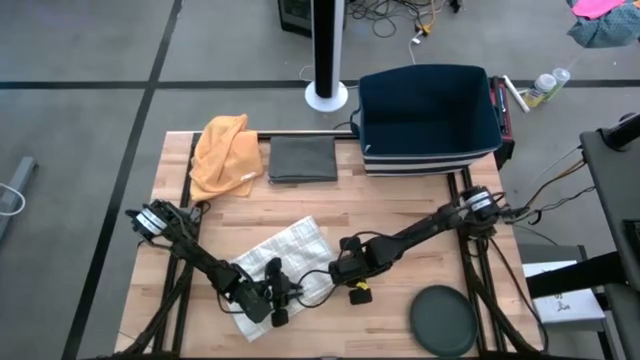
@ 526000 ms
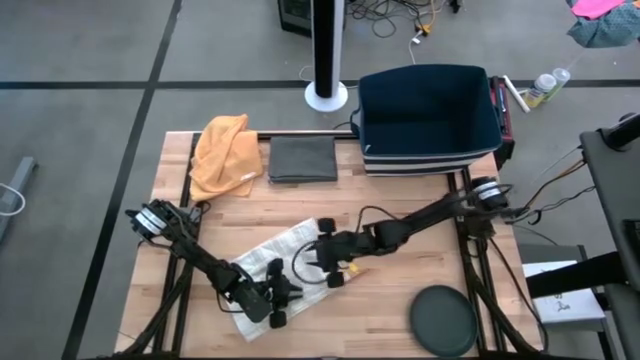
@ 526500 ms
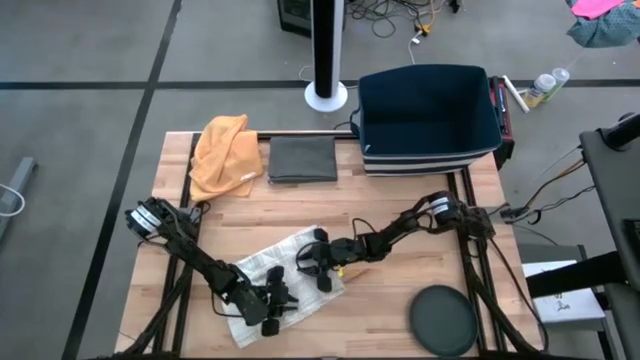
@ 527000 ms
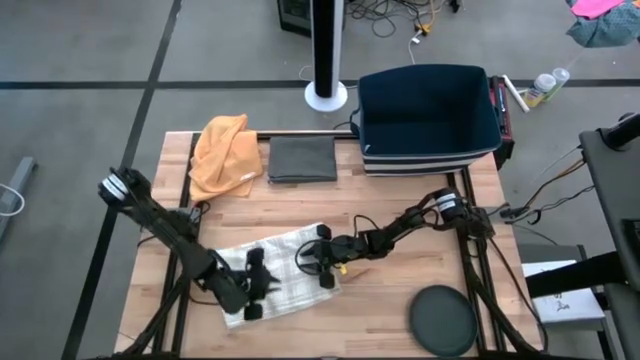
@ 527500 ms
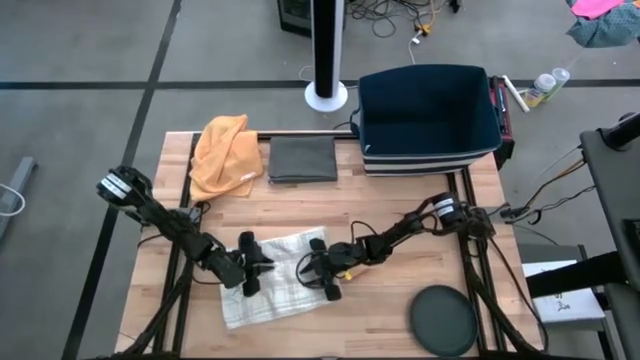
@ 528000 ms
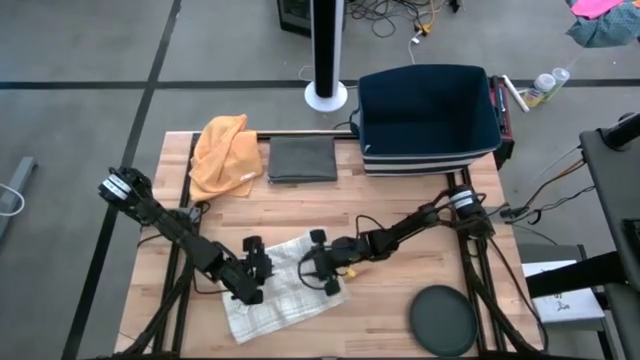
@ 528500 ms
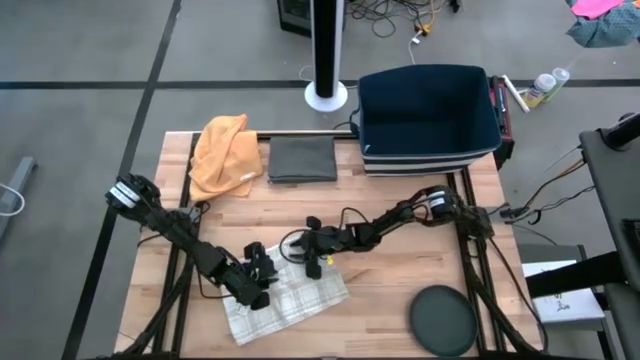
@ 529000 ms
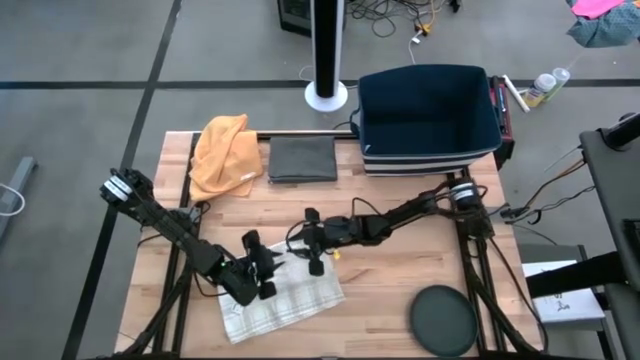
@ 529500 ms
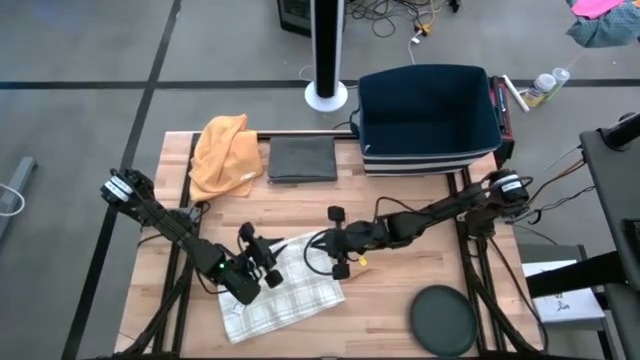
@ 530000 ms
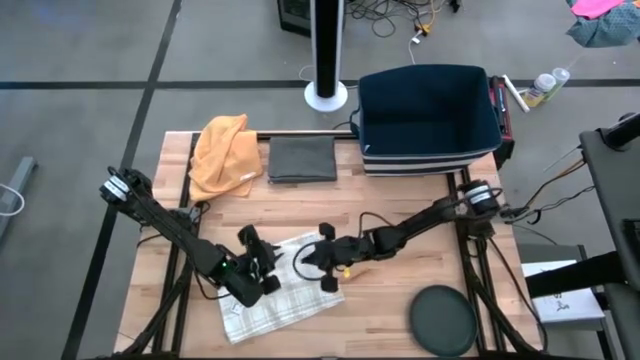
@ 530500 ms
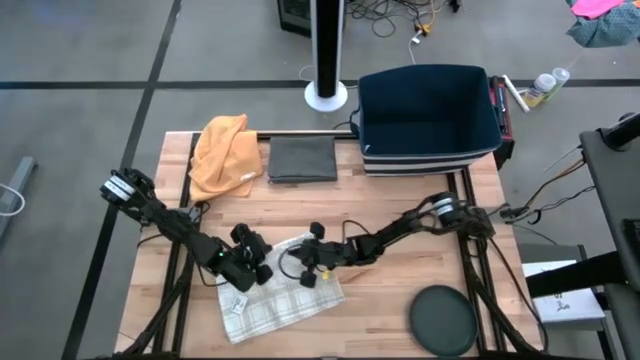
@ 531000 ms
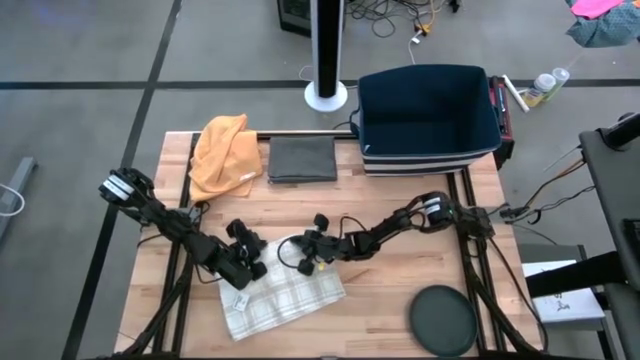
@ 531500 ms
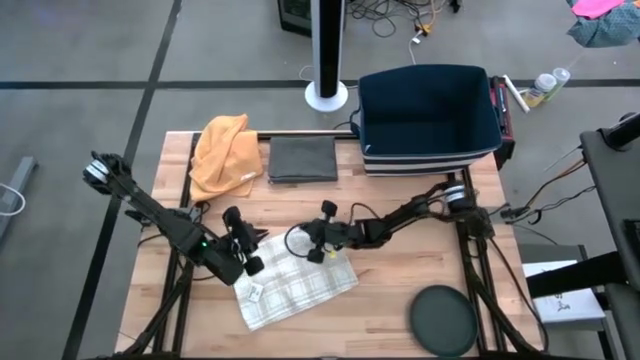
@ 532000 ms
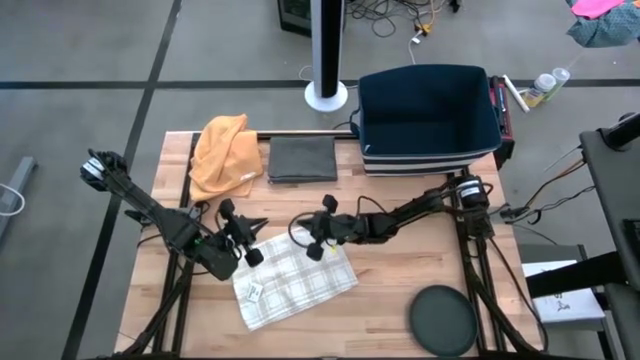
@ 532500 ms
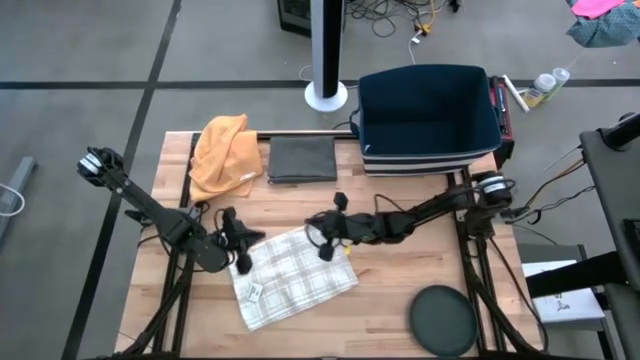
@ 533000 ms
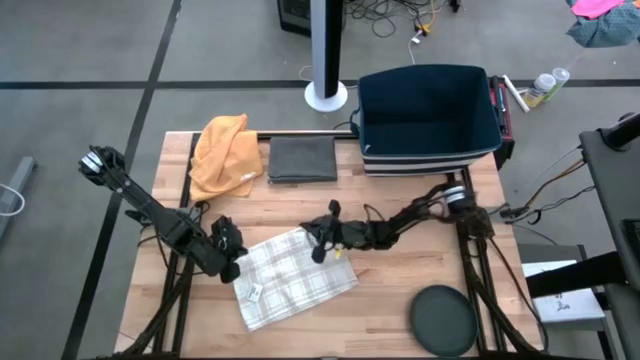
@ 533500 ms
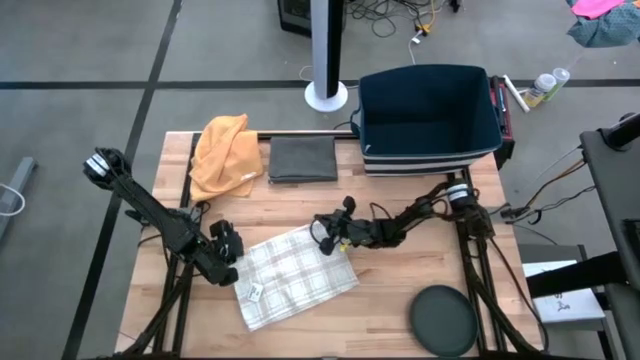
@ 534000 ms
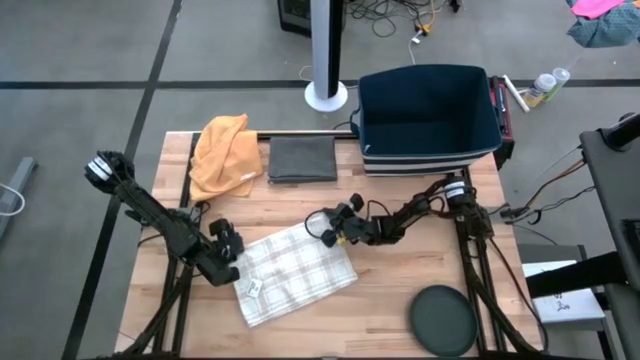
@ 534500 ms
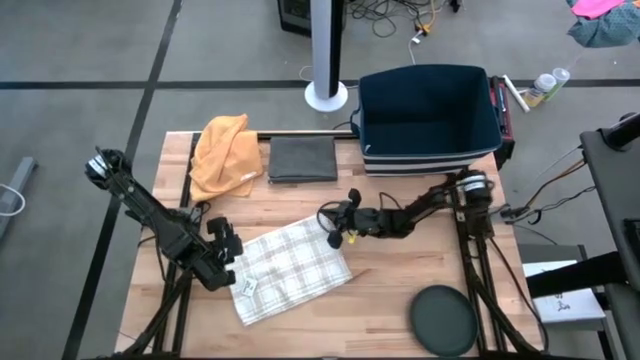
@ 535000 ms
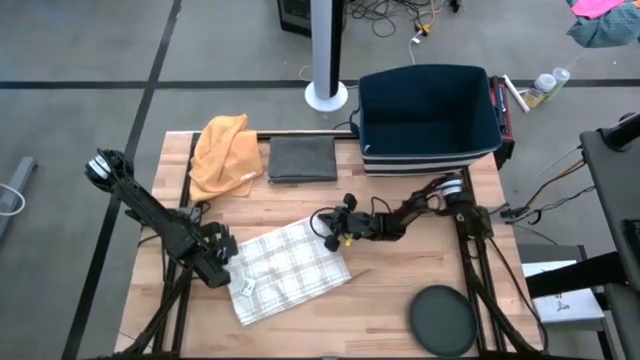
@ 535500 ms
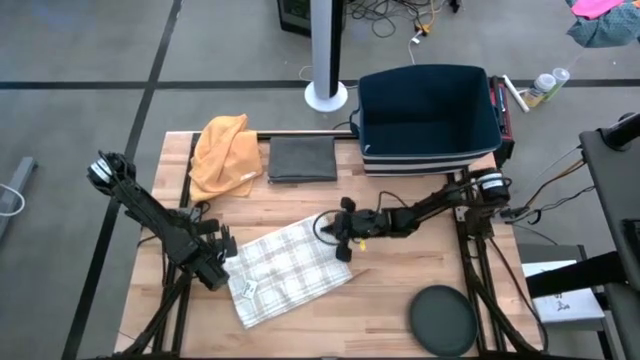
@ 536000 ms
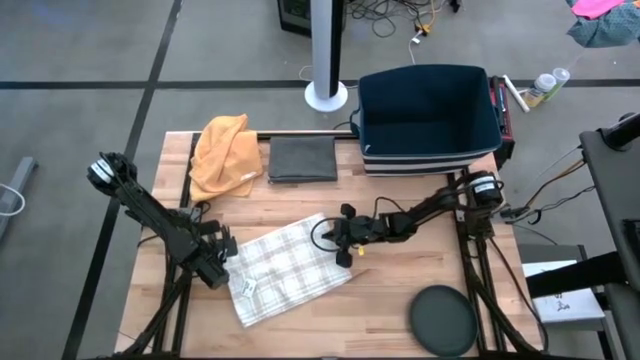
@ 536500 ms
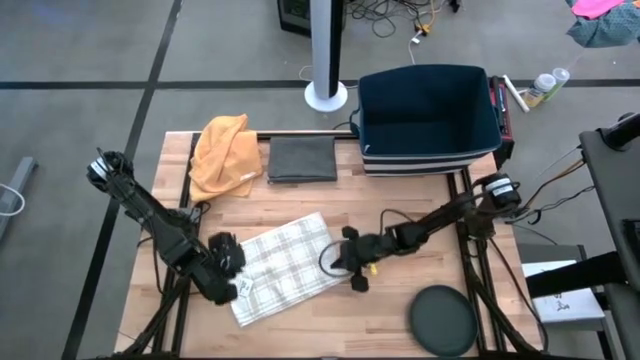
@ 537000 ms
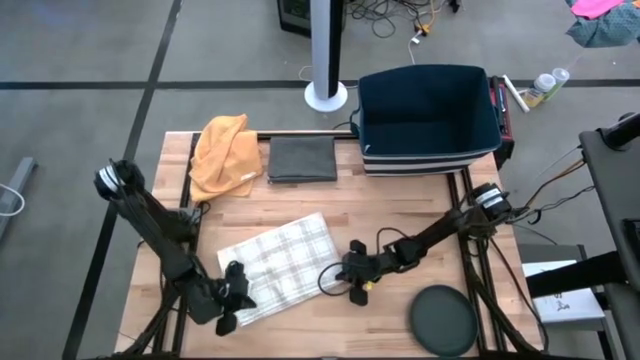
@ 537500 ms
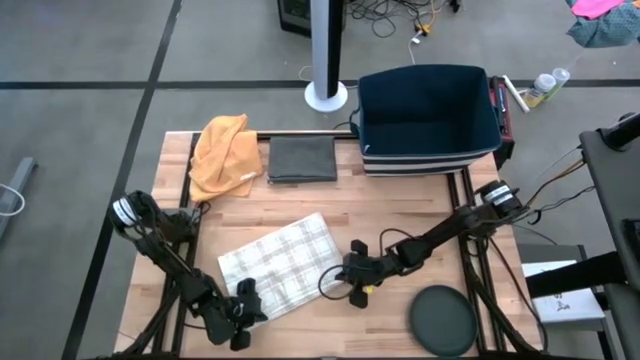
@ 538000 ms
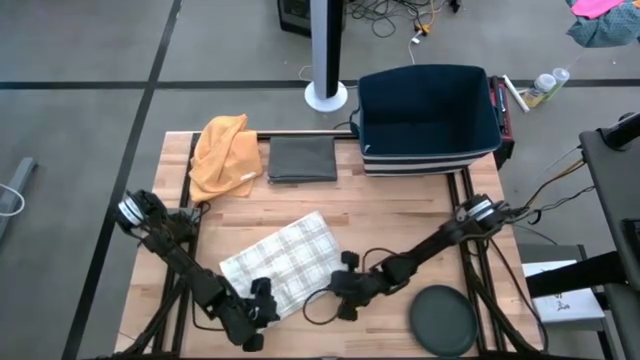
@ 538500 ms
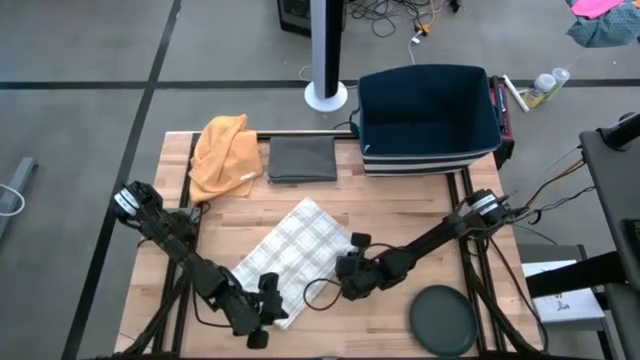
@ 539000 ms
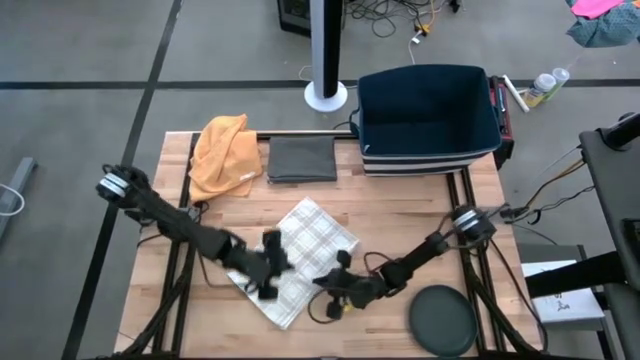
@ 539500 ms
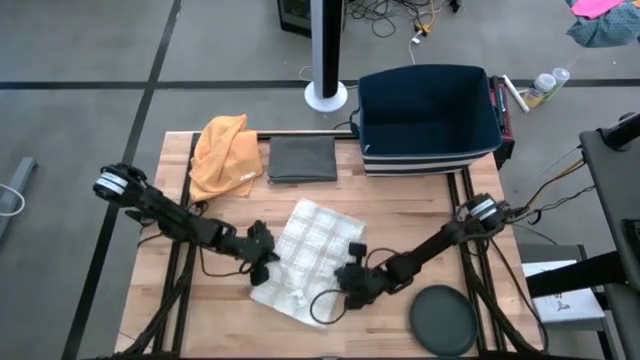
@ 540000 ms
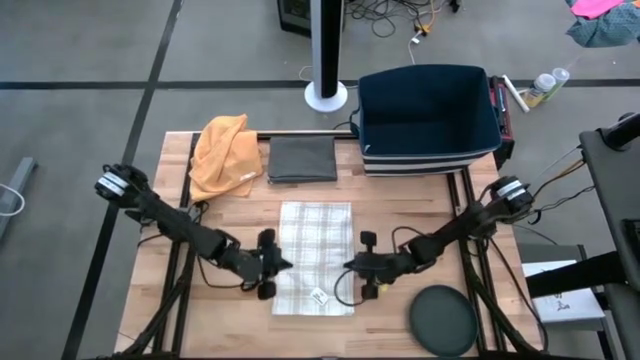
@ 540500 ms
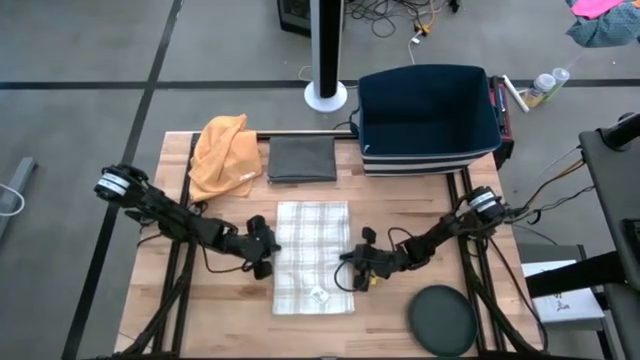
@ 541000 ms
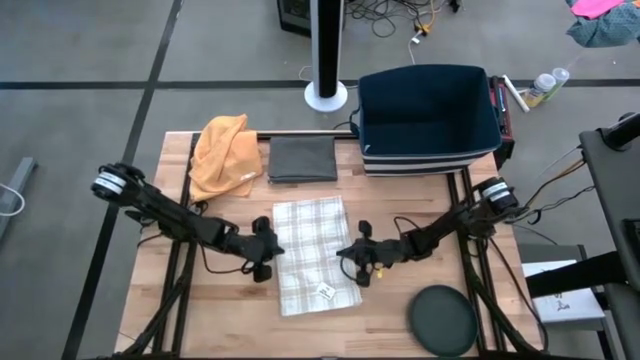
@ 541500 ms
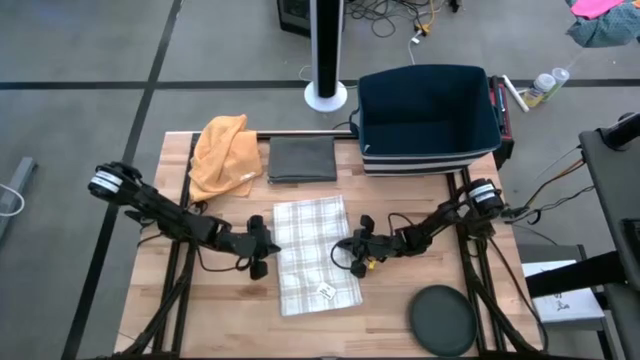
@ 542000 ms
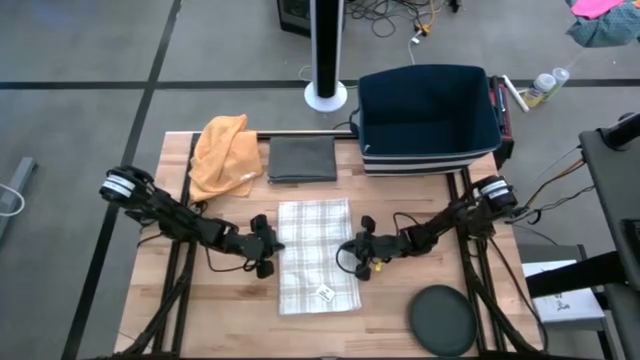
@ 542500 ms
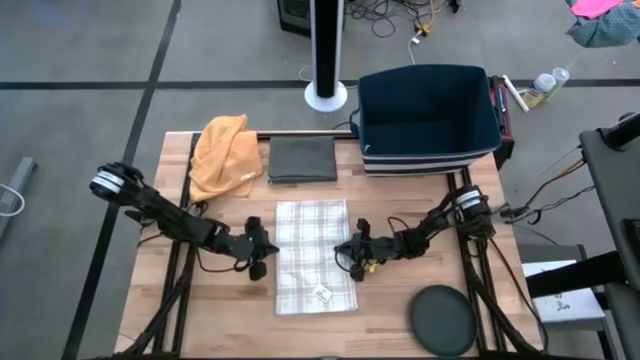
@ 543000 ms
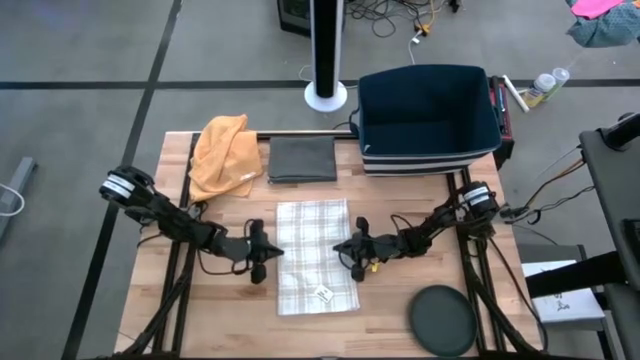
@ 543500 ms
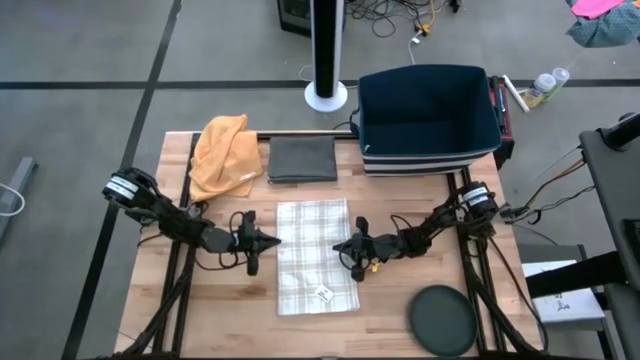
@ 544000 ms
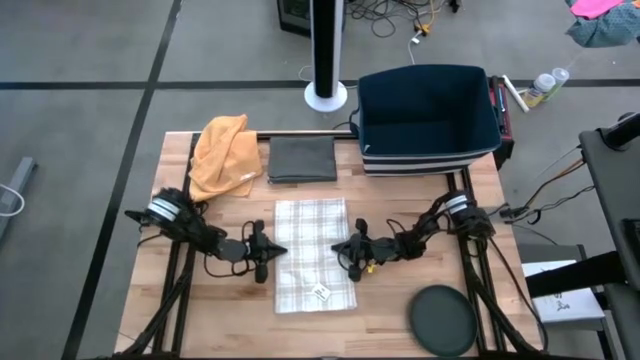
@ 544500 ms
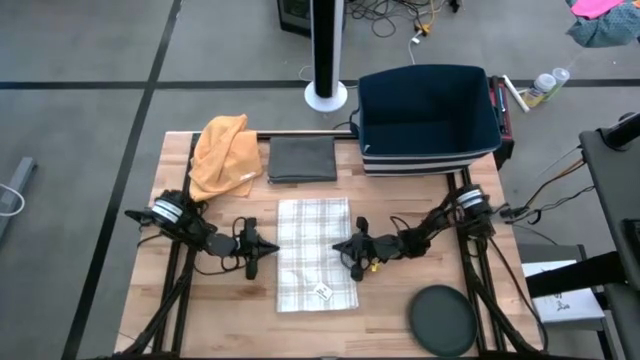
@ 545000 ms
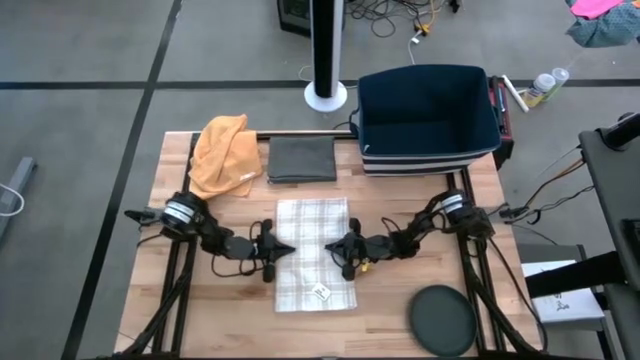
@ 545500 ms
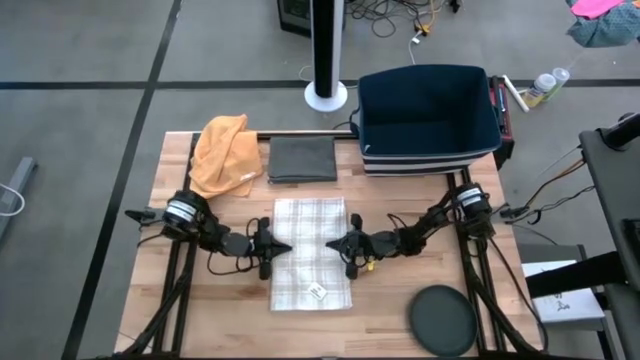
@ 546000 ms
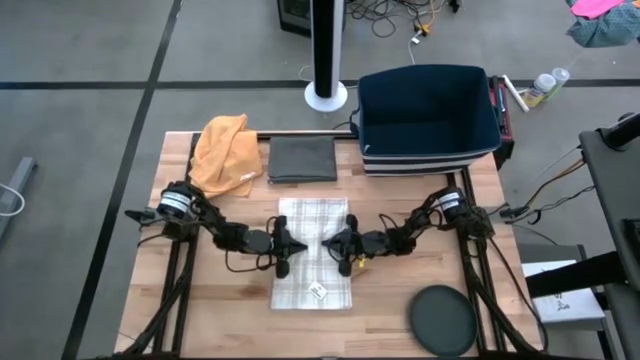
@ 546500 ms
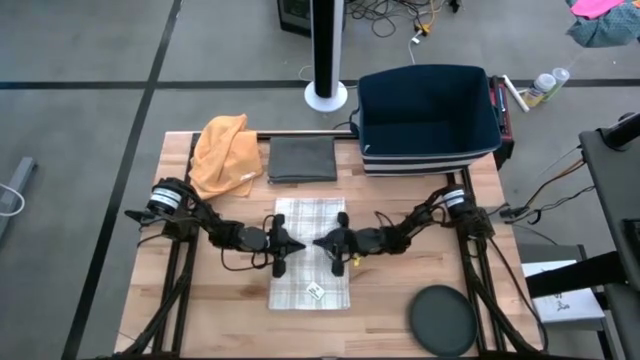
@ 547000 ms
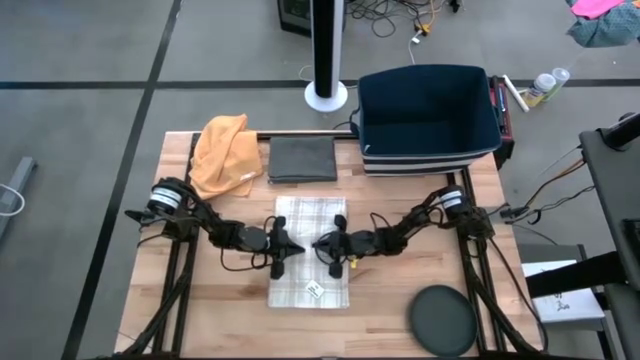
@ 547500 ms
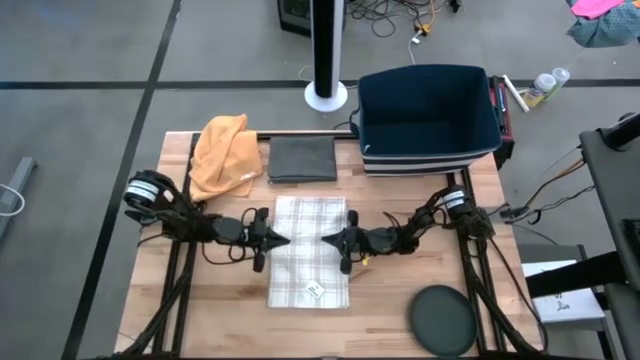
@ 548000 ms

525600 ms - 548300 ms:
Task: Fold kitchen towel into neat rectangle
Fold the white patterned towel
